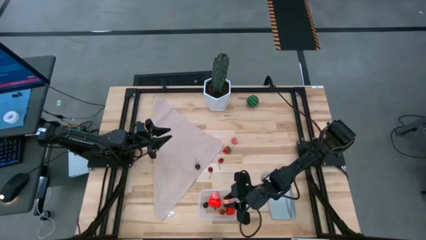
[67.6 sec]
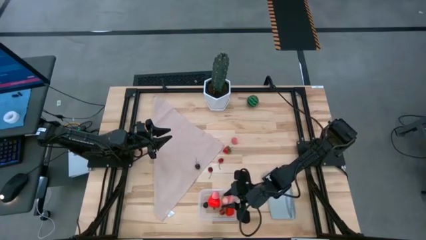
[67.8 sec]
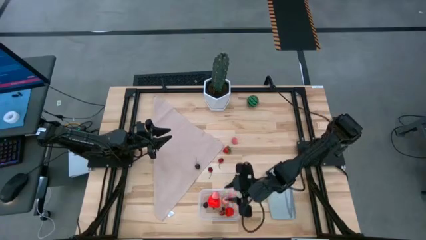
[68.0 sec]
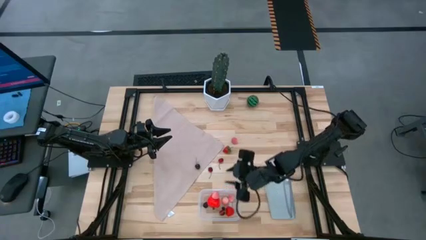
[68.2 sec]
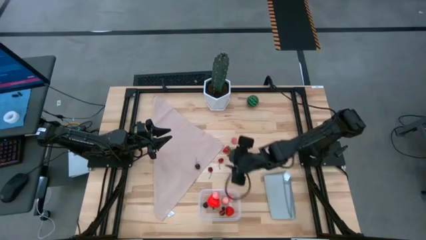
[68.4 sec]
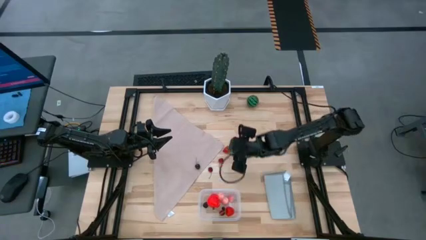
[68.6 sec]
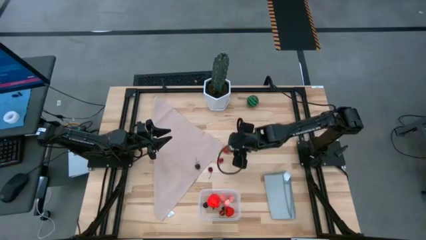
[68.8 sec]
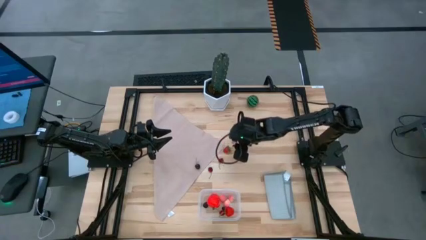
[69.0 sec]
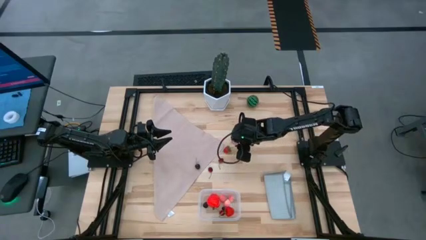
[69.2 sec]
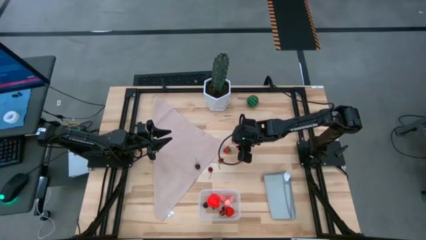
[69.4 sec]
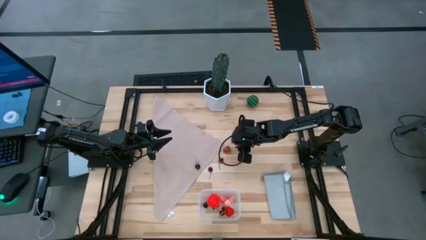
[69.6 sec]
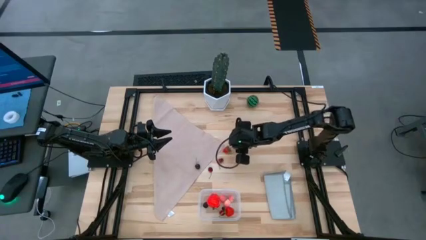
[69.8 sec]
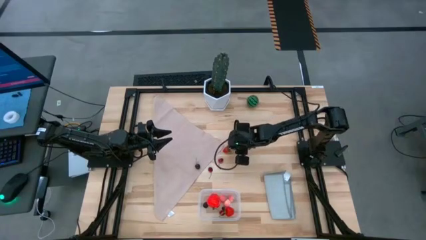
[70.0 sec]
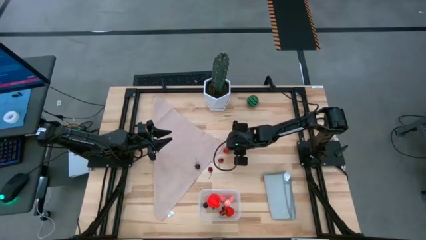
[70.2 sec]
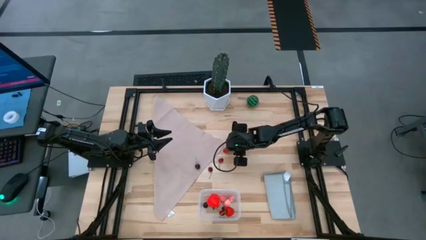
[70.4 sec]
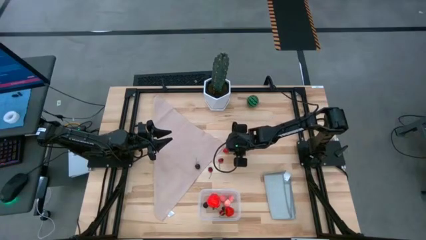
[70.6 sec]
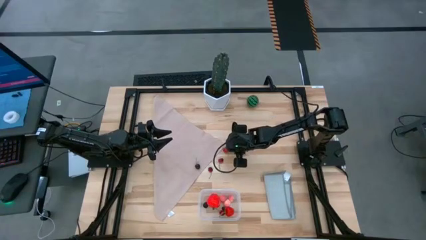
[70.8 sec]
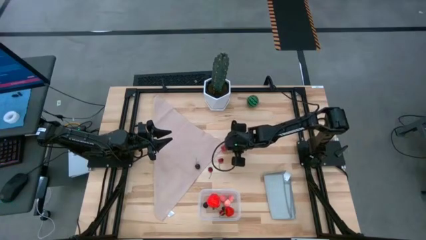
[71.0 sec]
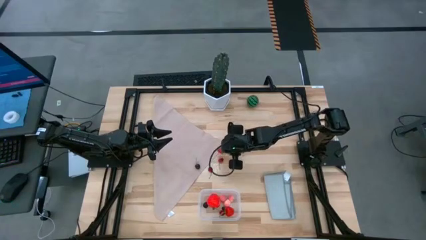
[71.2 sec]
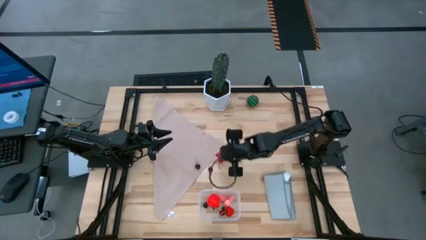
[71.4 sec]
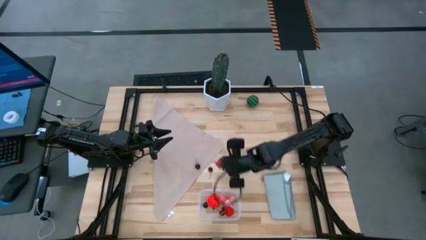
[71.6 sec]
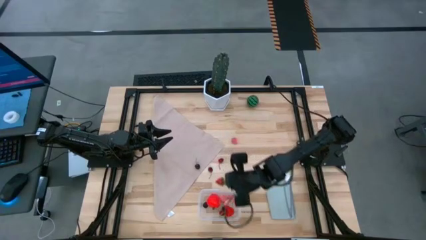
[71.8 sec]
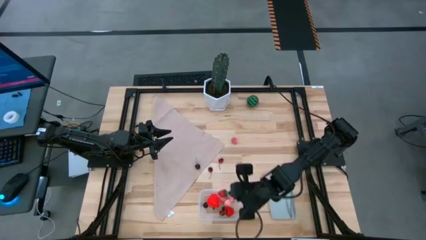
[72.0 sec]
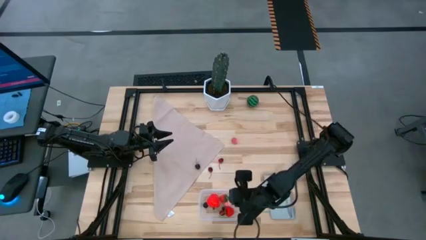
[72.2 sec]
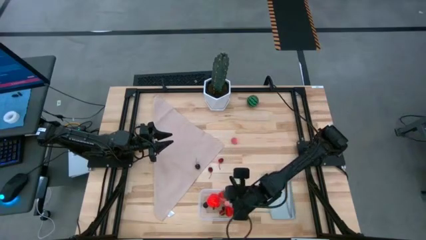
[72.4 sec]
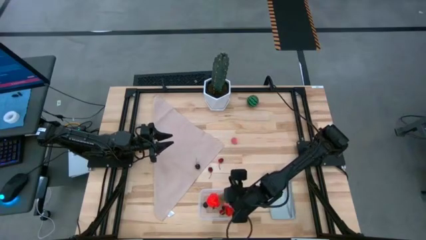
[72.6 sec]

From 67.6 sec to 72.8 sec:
Task: Pick and placing Produce into tupperware
Put the strawberry into the transparent bin

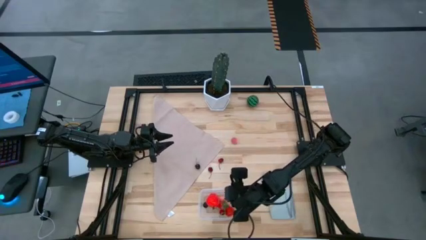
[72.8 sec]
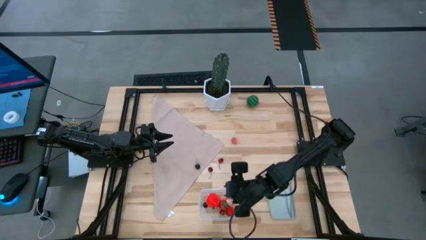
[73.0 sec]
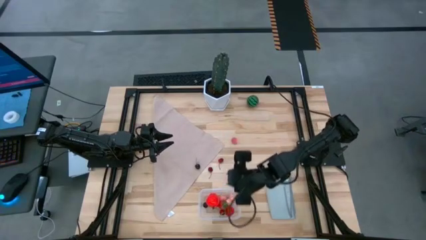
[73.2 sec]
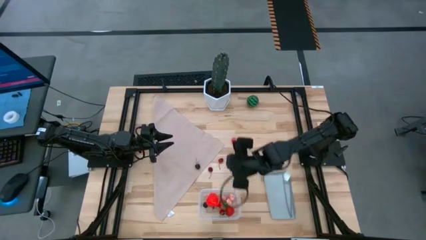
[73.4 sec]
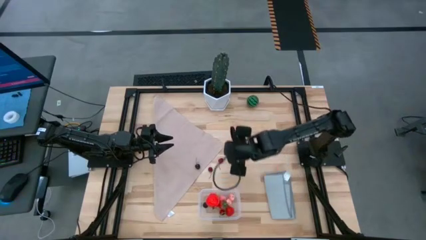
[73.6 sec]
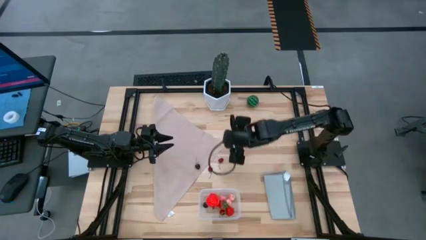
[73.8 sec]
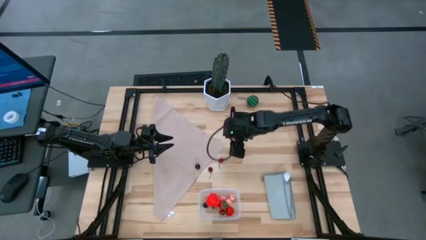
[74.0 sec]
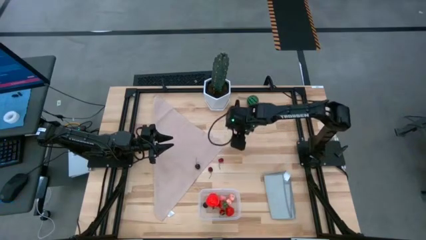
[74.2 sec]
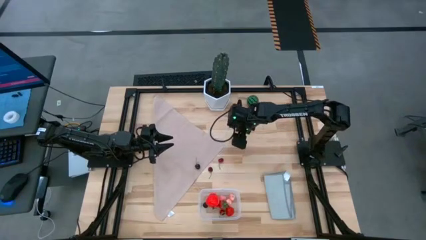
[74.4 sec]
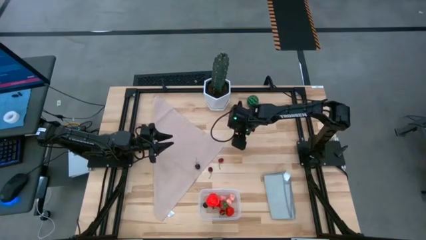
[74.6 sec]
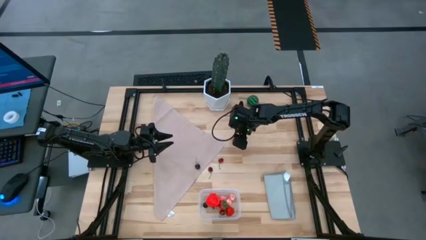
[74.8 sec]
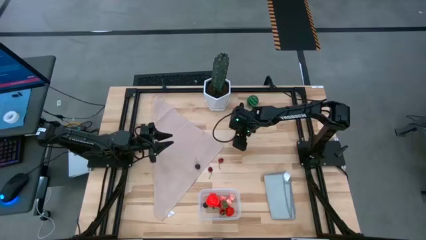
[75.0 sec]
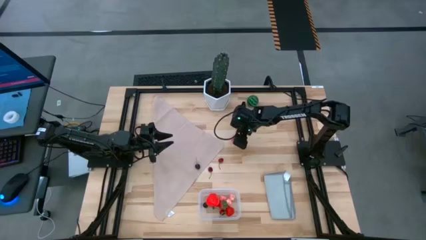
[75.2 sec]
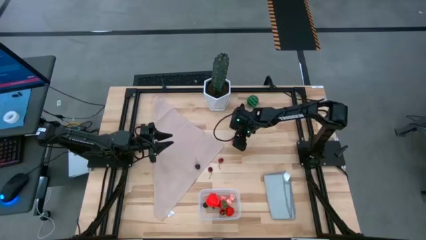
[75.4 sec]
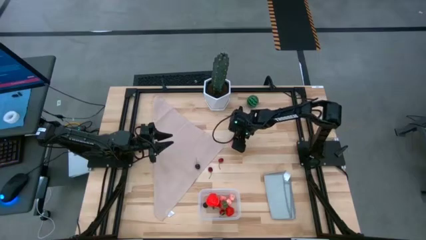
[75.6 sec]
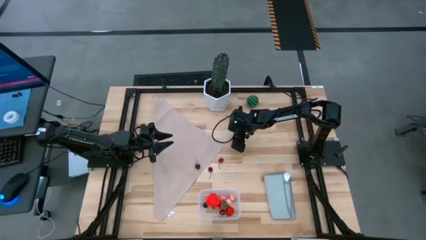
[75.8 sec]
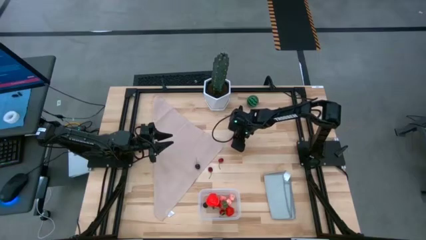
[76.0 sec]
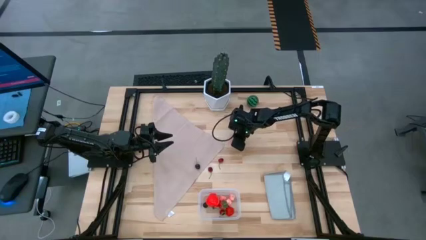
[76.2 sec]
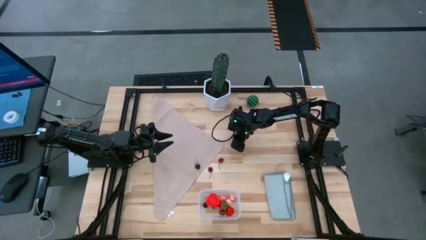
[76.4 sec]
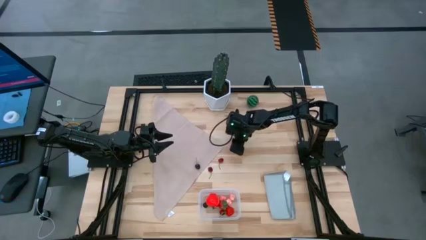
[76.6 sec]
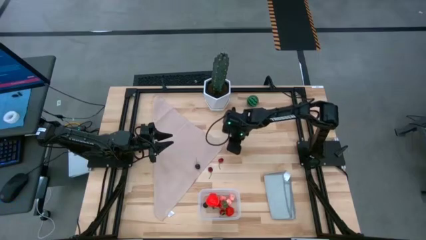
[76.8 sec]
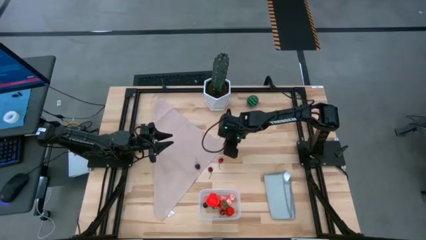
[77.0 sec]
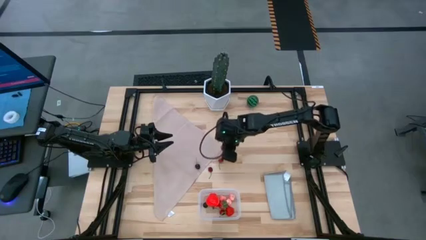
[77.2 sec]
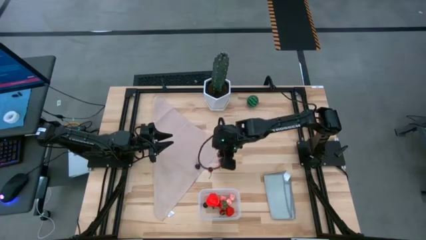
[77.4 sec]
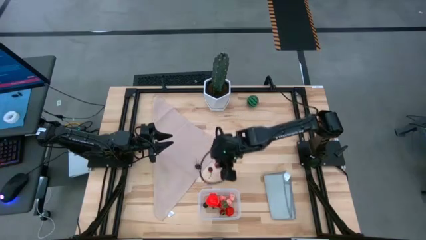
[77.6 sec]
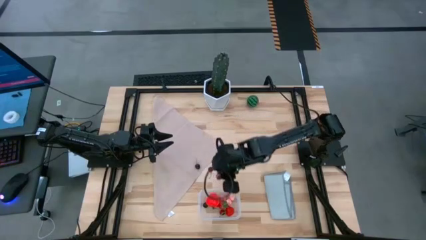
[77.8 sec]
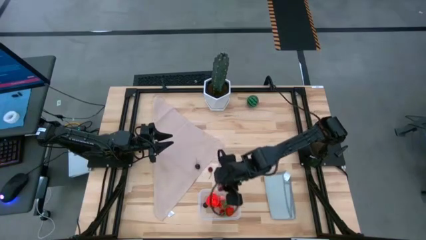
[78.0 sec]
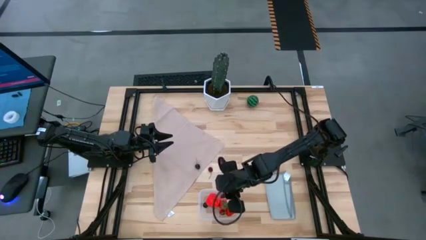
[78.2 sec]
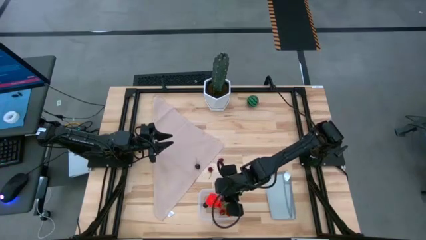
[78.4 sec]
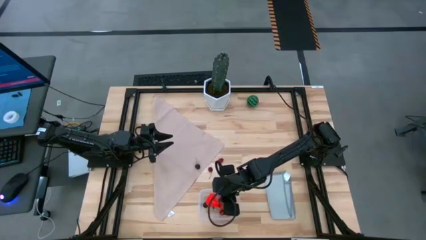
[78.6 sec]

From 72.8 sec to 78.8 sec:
Put the peach into the transparent bin

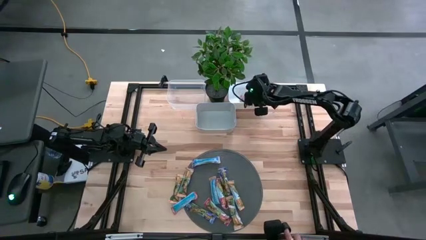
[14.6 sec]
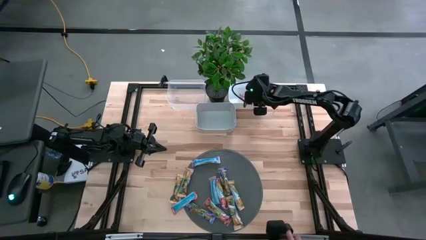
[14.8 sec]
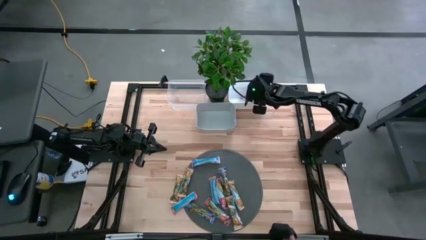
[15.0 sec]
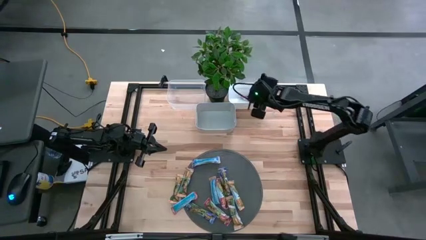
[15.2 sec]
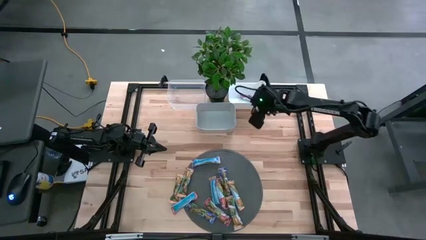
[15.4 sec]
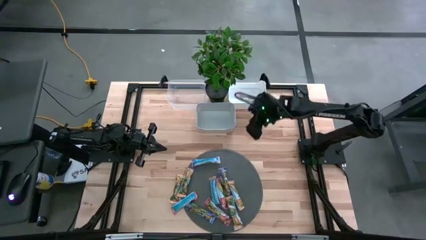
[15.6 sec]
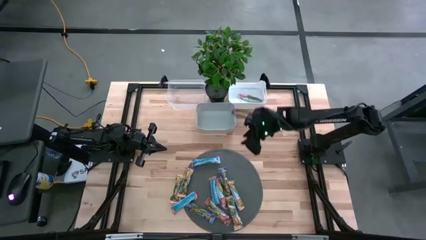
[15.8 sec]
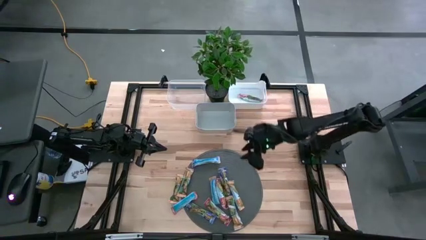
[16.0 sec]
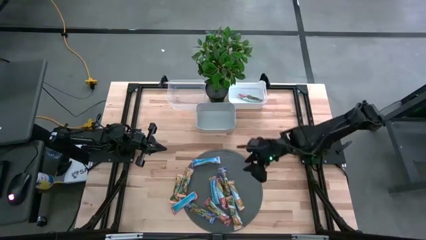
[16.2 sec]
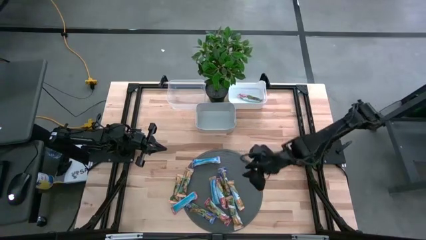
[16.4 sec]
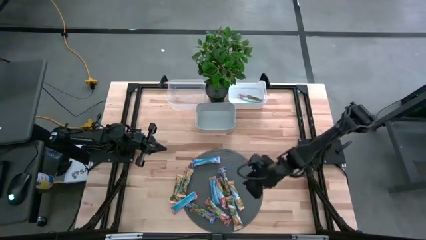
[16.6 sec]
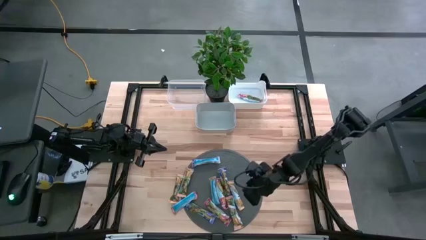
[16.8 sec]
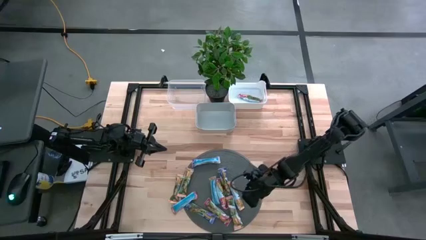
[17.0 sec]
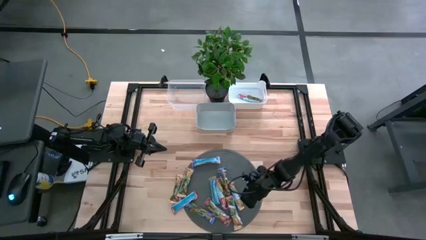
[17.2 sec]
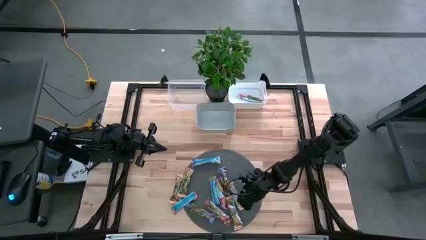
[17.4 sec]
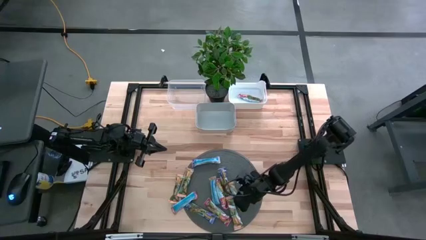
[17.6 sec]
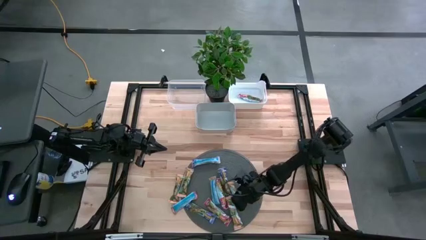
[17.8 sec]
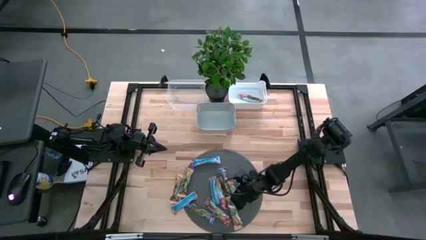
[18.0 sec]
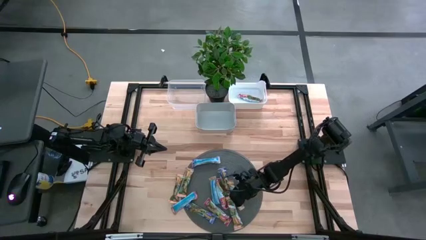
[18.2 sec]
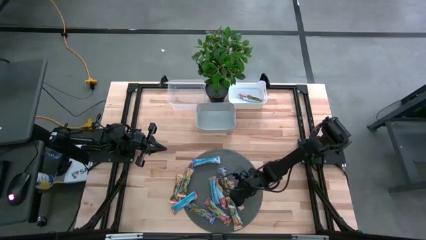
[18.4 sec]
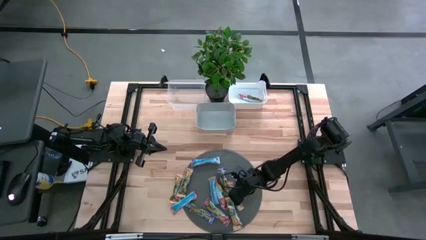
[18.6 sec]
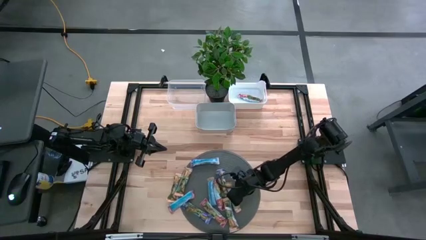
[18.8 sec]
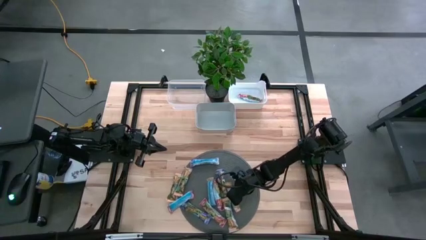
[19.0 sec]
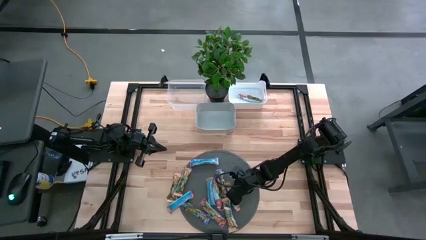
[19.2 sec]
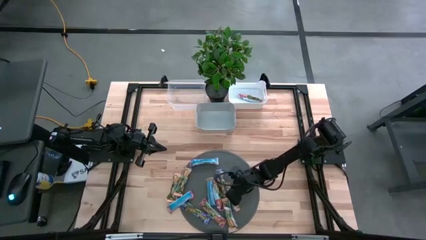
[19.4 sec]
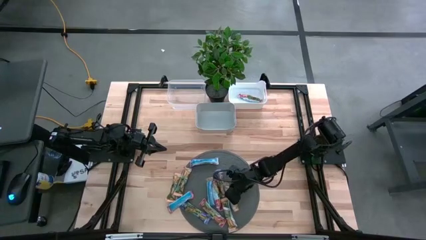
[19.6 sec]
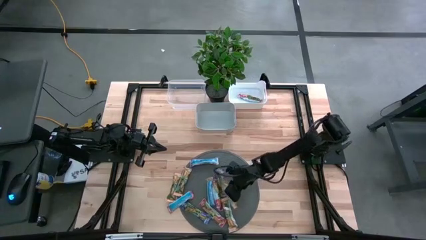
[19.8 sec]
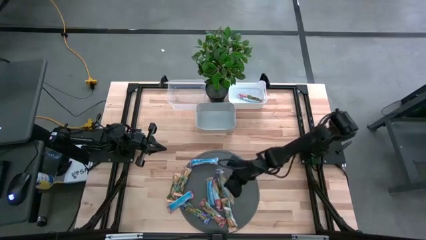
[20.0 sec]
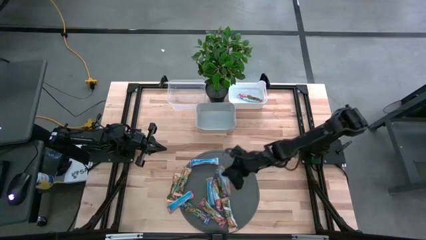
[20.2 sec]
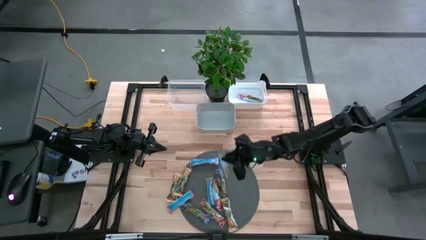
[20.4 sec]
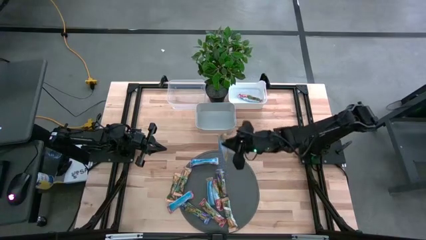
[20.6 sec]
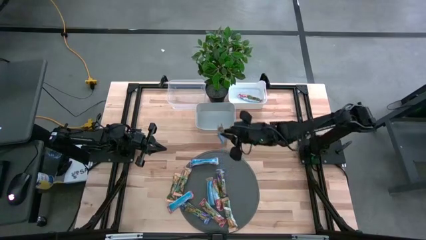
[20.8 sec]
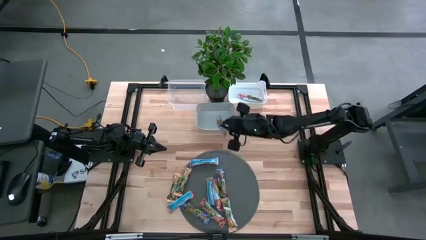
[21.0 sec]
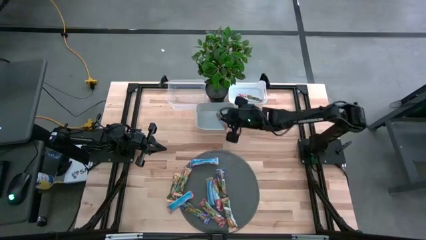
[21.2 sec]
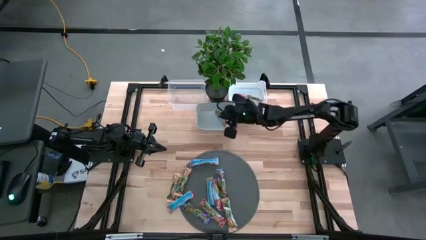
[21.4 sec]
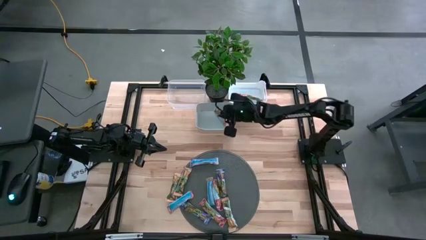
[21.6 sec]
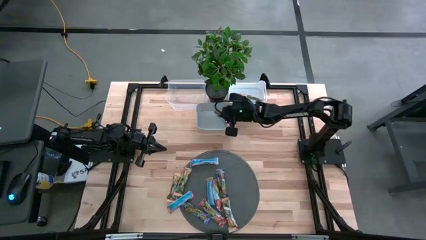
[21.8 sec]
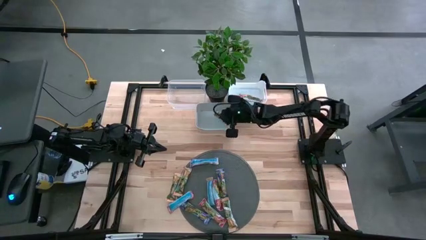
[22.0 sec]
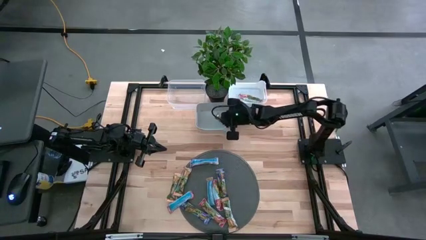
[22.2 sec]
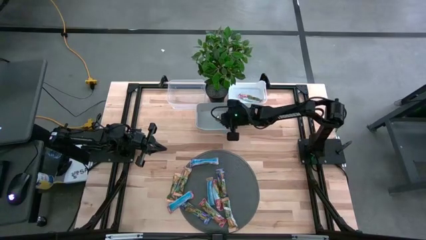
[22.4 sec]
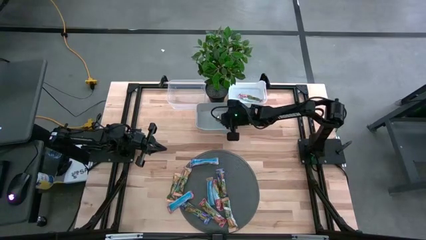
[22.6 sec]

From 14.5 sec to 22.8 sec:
Task: Pick and place Granola Bars by type
Put the orange granola bar into the gray bin
